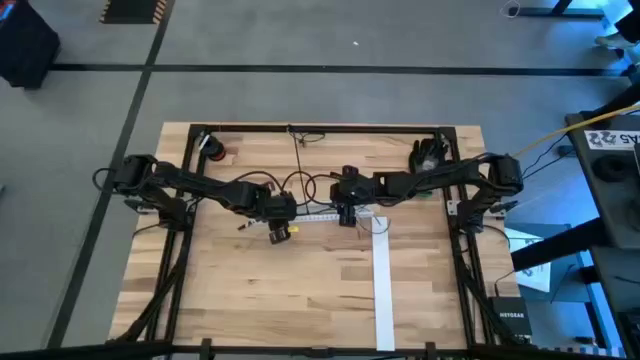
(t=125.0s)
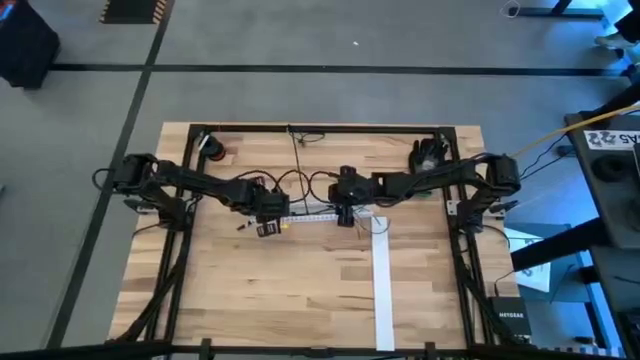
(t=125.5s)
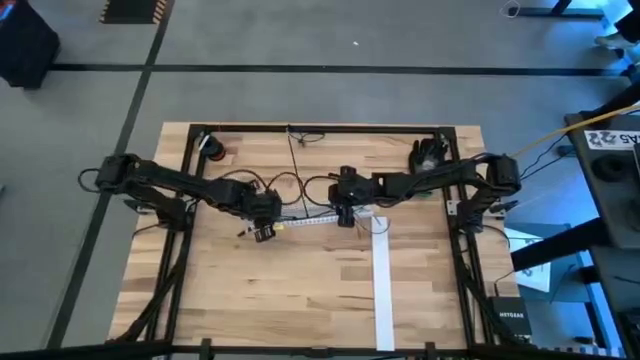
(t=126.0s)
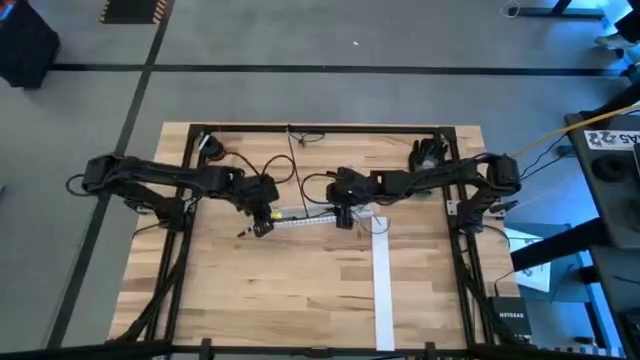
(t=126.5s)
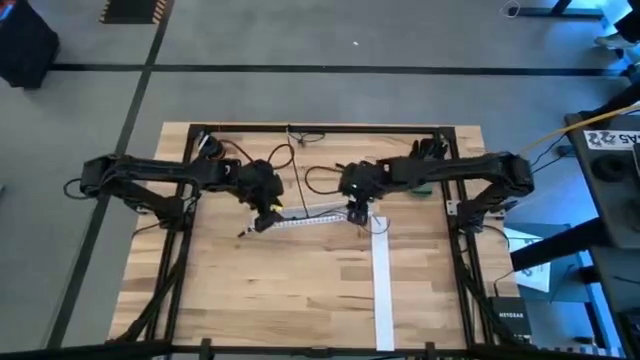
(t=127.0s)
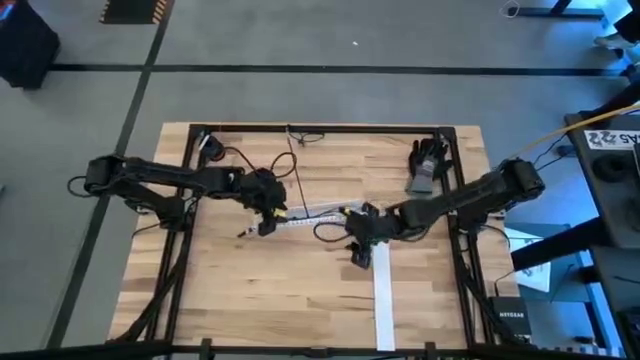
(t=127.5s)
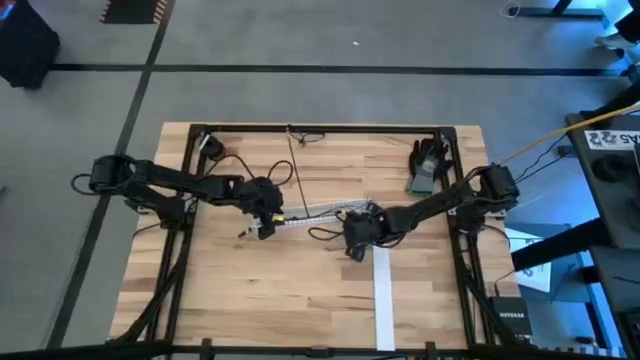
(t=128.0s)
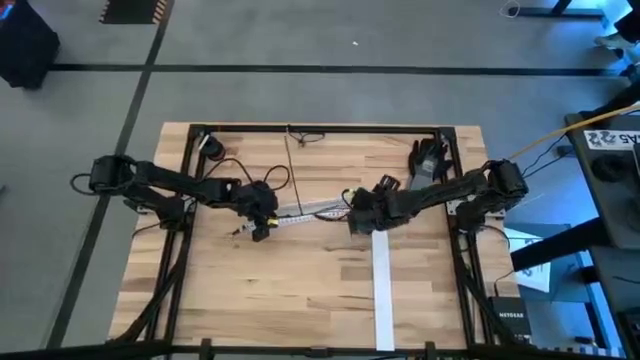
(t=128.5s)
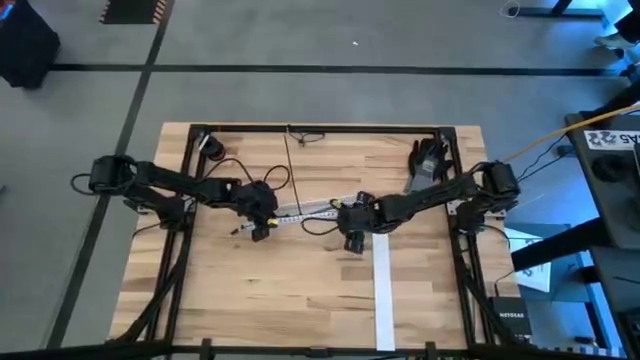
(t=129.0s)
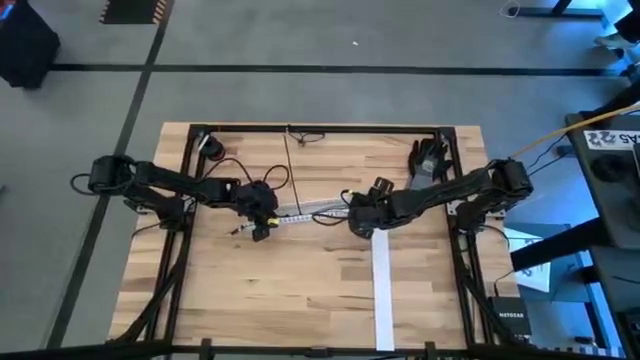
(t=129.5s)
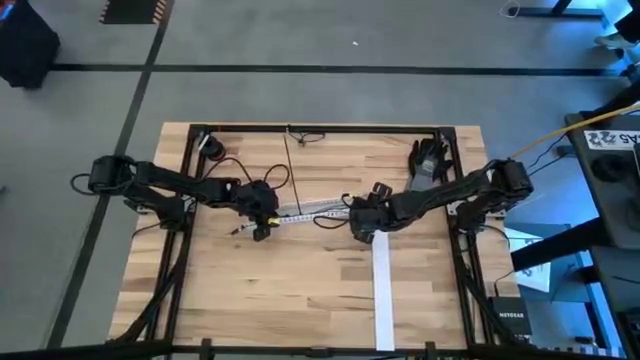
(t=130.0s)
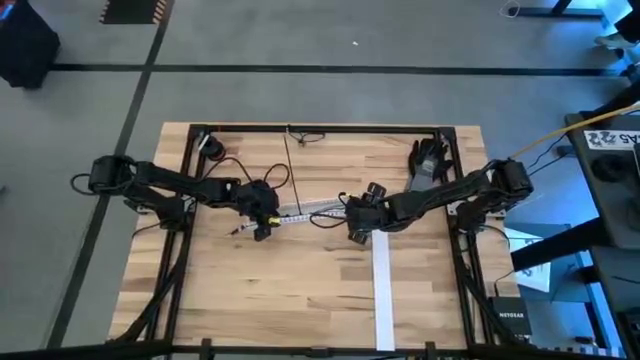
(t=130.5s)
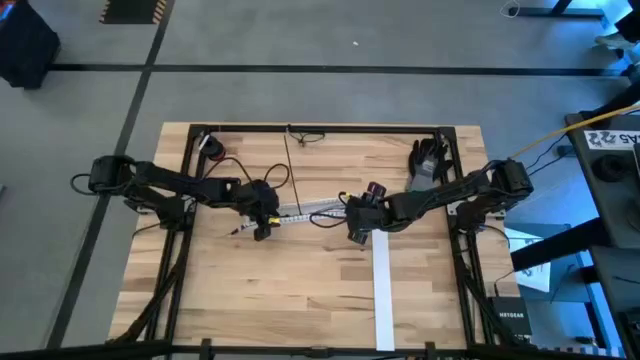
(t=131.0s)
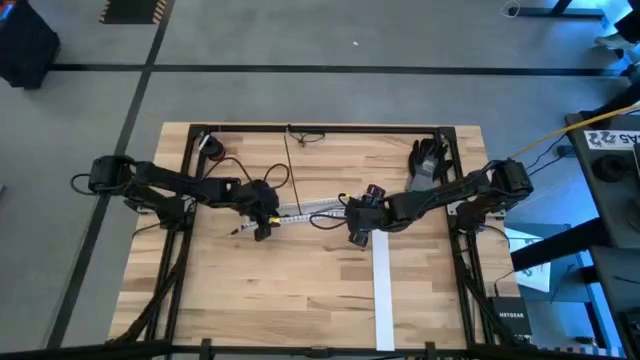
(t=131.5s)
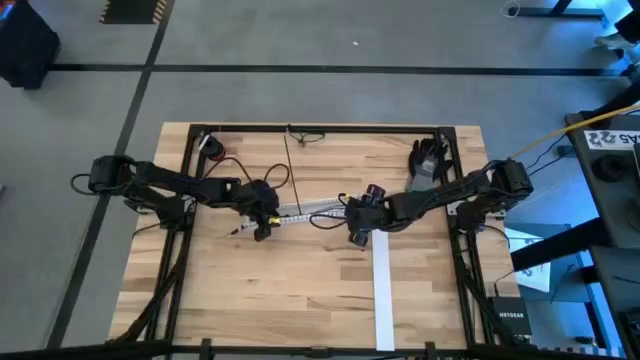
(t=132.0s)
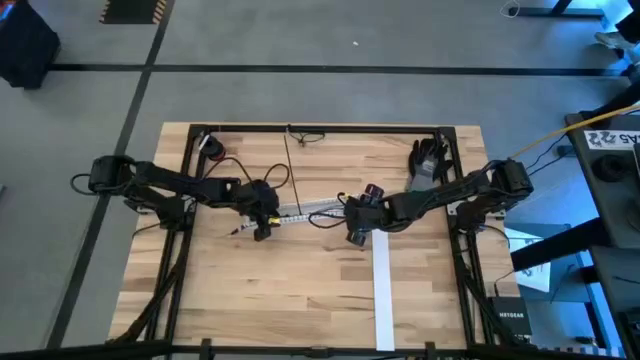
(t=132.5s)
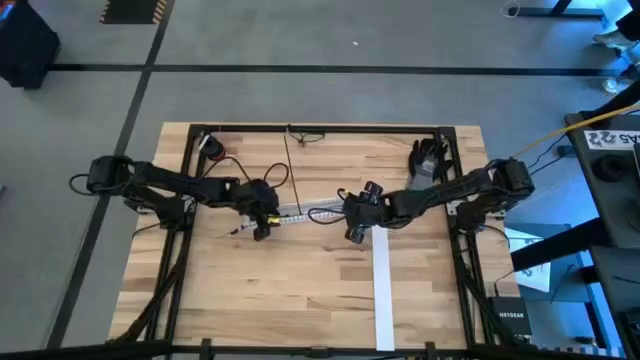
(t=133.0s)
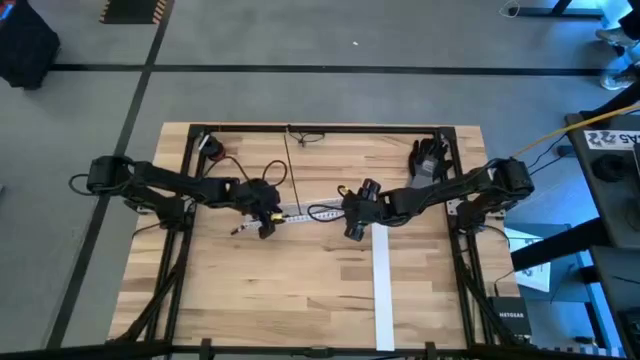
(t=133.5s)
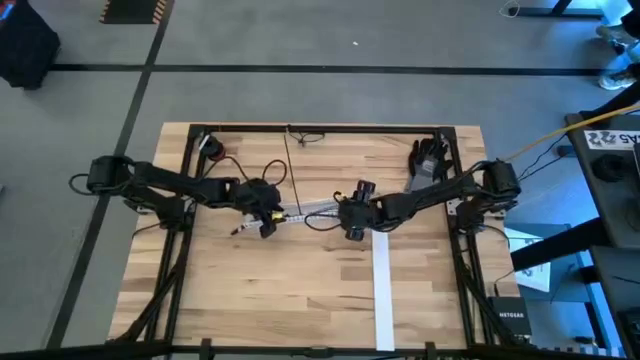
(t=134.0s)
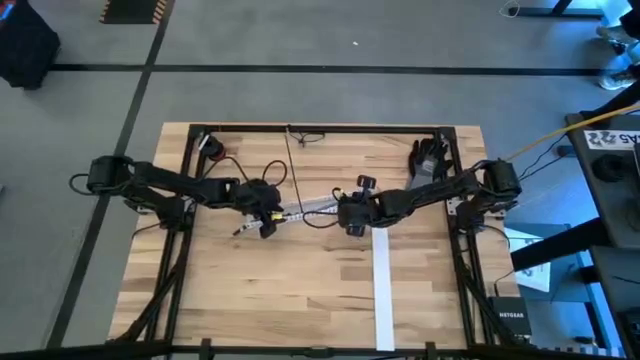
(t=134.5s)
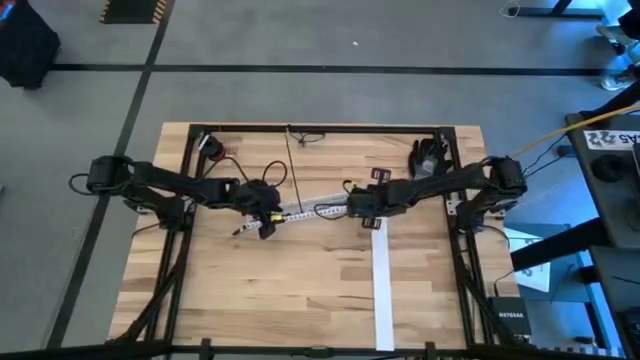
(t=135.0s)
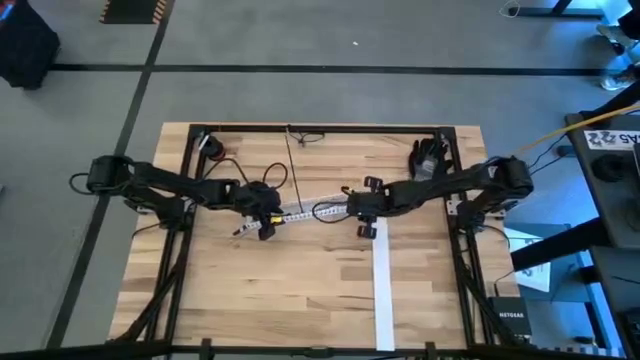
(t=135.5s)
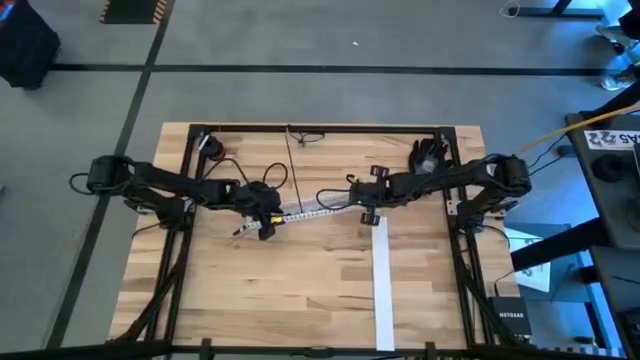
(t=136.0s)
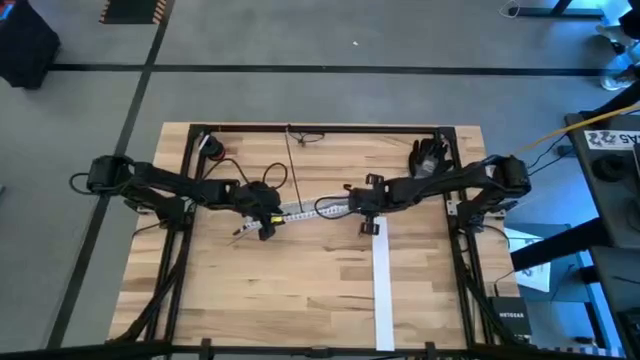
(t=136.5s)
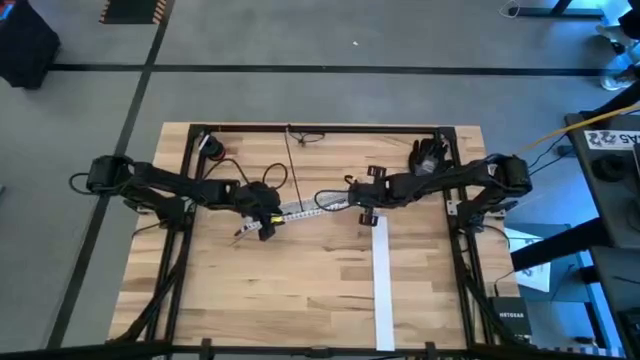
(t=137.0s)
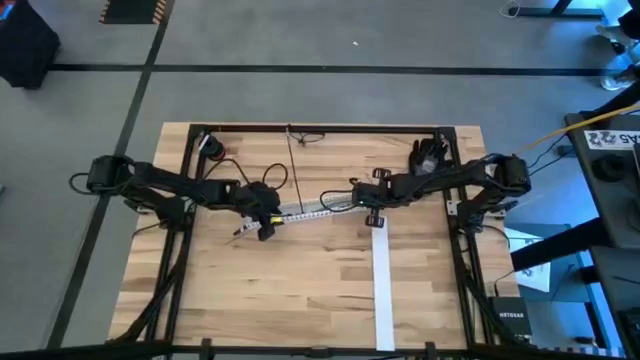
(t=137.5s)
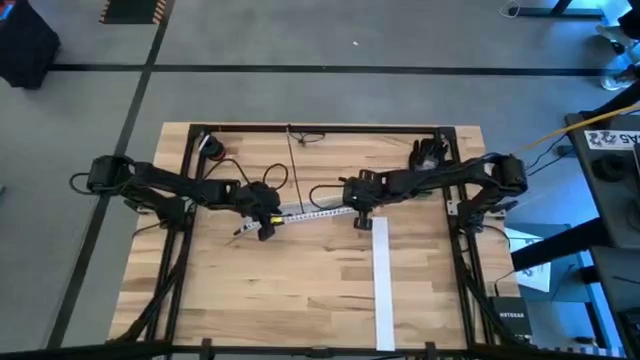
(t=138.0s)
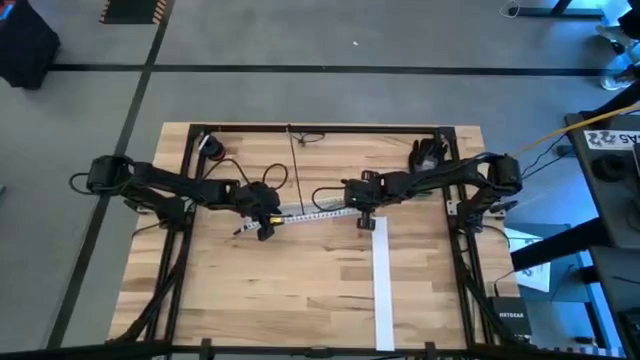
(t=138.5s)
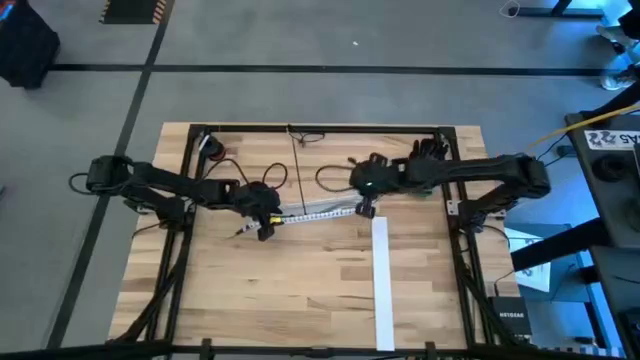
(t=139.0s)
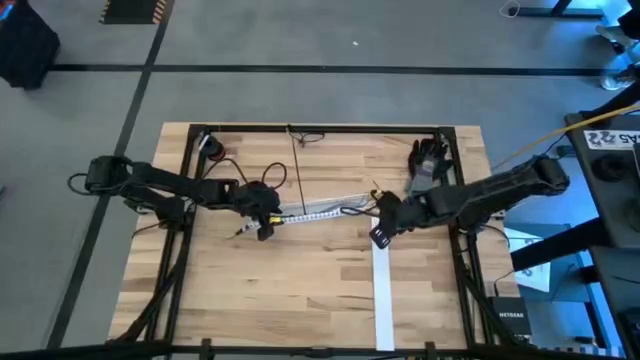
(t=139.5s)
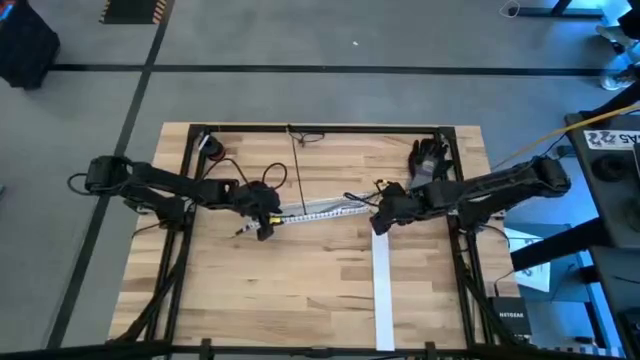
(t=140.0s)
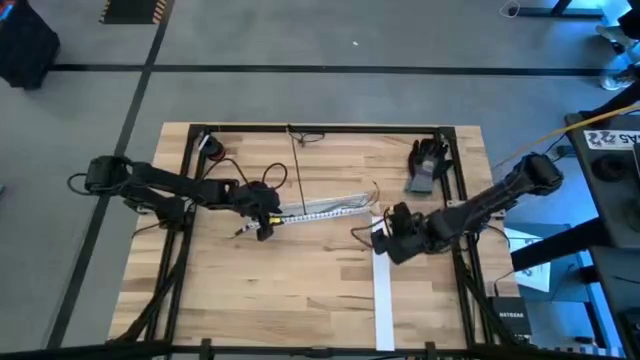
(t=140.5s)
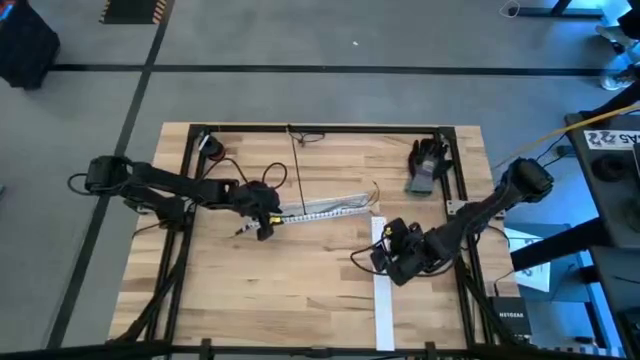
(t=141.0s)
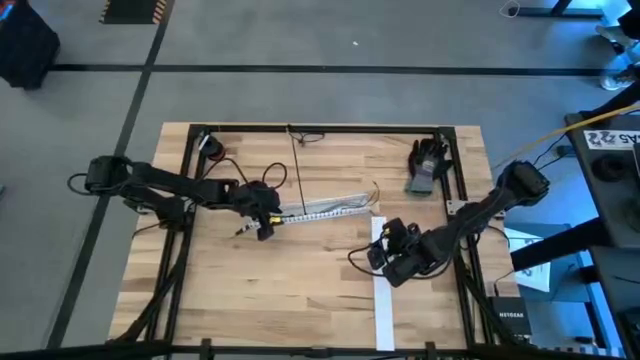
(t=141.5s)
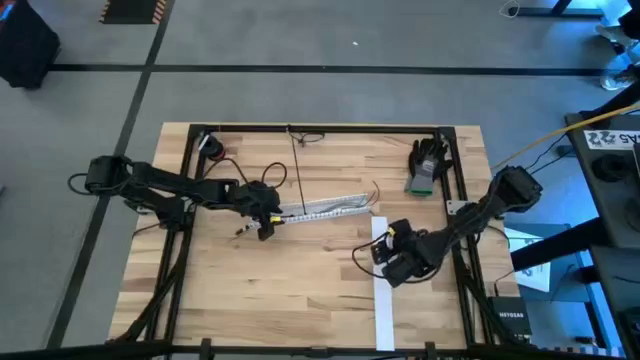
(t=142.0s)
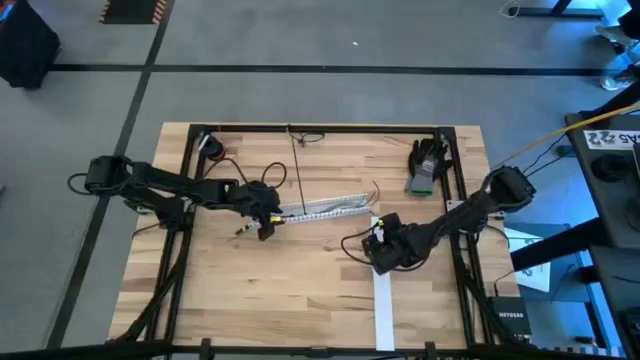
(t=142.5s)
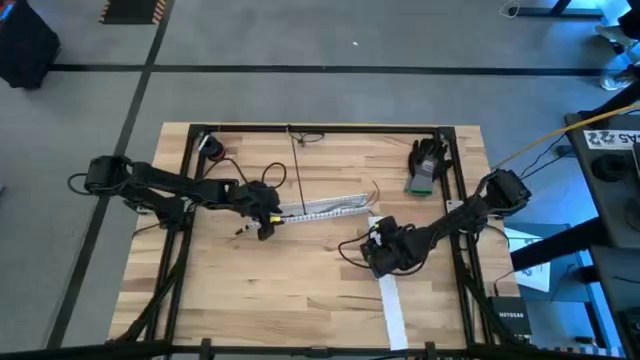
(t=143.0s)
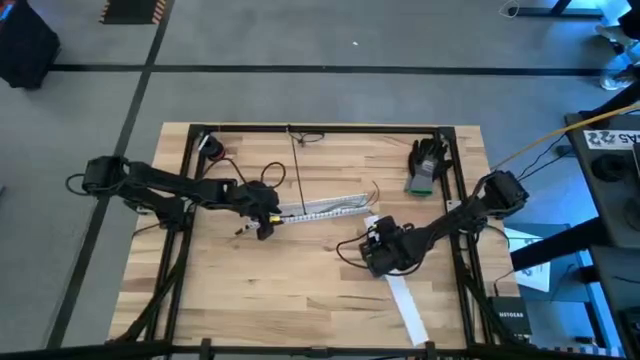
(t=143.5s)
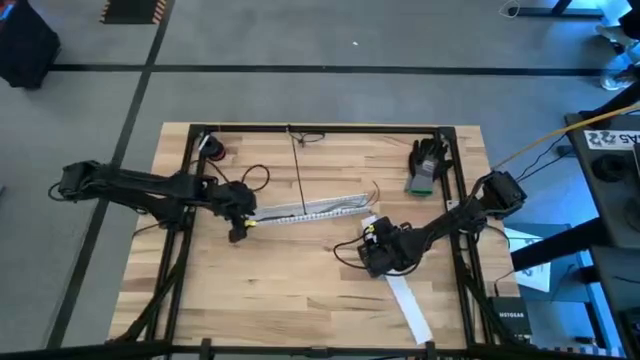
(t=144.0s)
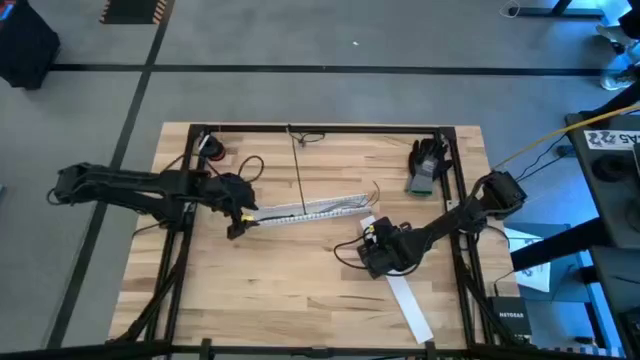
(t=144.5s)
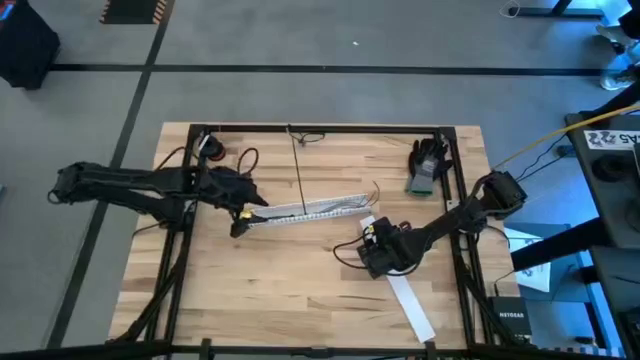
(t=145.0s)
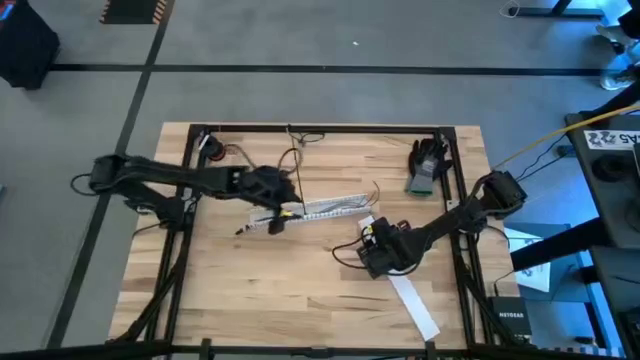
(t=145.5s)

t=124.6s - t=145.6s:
Task: Ziptie cables
Put the set of zip-tied cables in the cable duct
